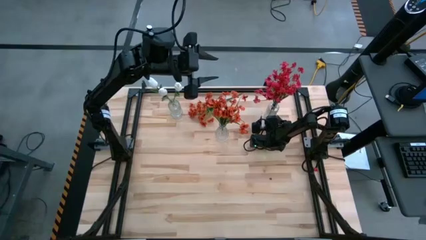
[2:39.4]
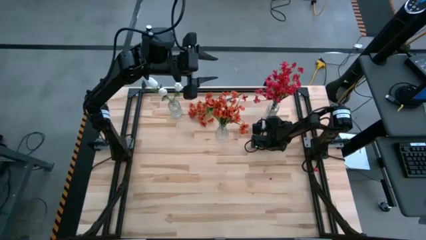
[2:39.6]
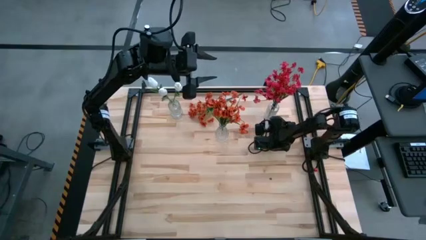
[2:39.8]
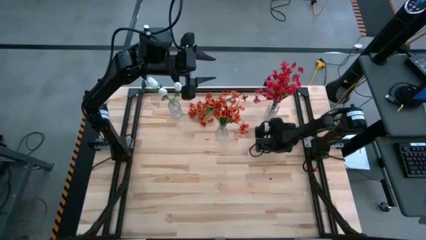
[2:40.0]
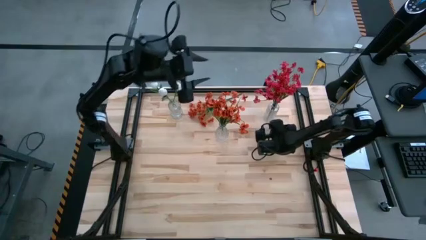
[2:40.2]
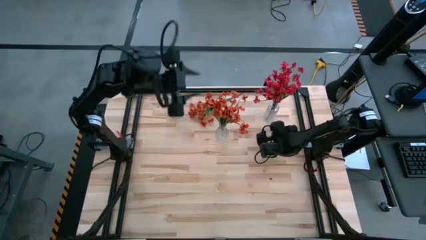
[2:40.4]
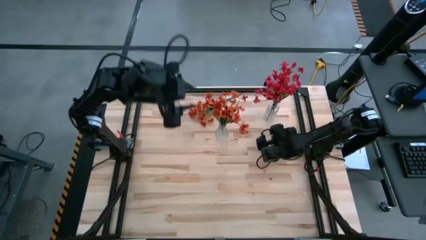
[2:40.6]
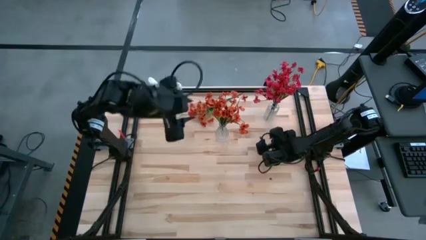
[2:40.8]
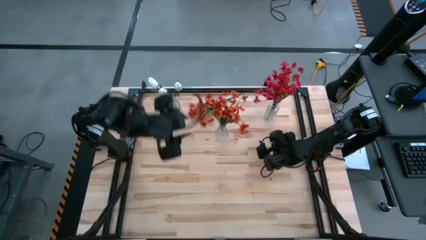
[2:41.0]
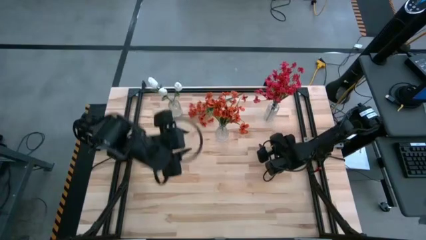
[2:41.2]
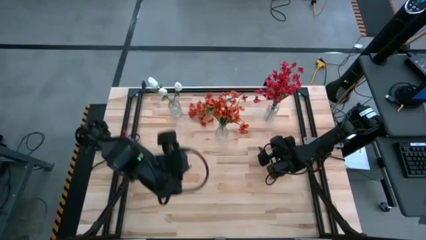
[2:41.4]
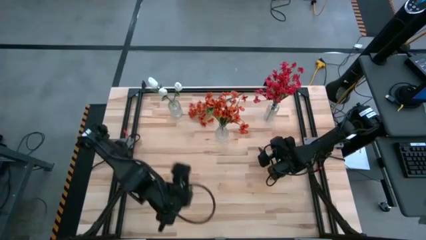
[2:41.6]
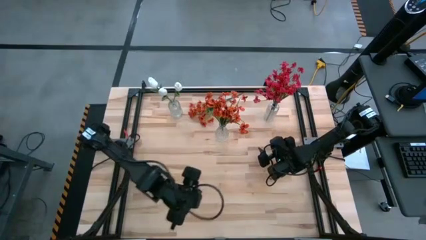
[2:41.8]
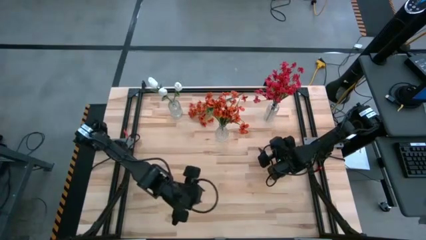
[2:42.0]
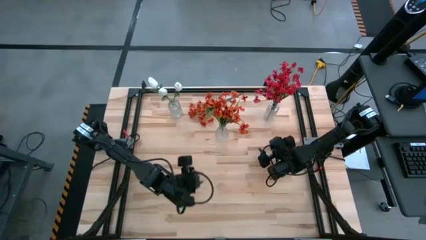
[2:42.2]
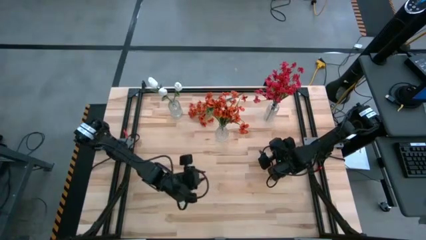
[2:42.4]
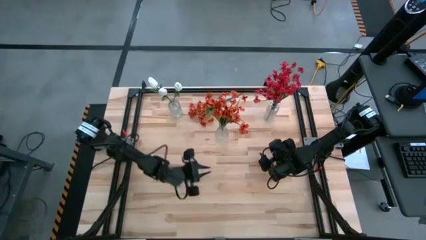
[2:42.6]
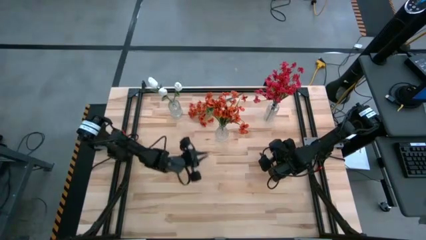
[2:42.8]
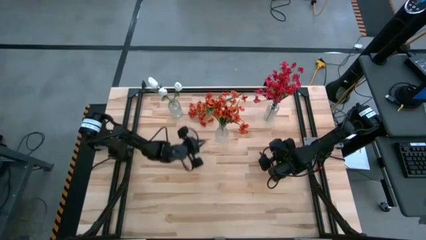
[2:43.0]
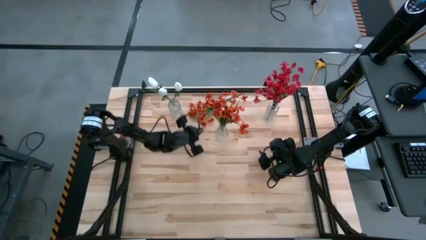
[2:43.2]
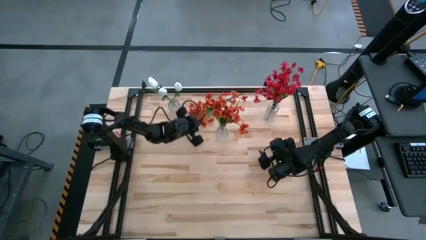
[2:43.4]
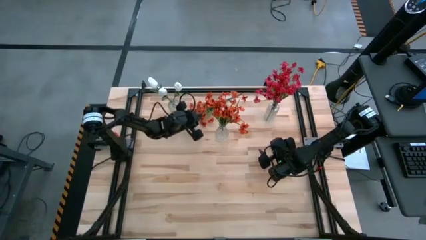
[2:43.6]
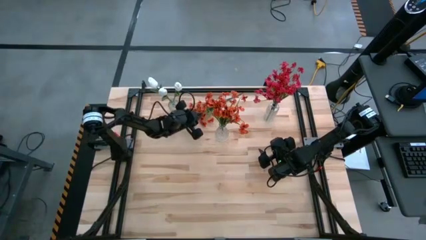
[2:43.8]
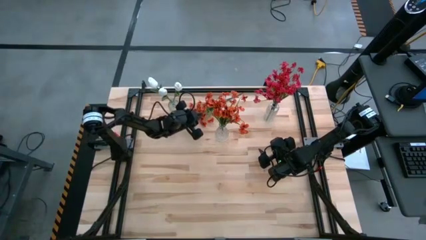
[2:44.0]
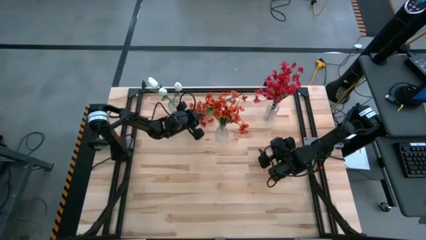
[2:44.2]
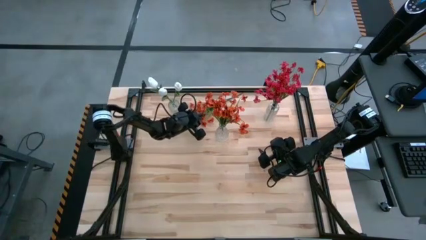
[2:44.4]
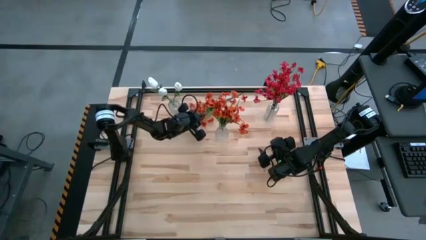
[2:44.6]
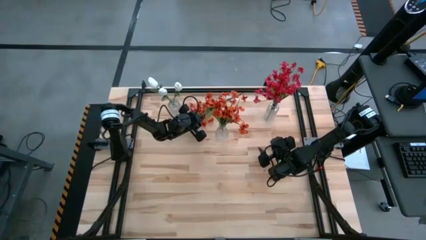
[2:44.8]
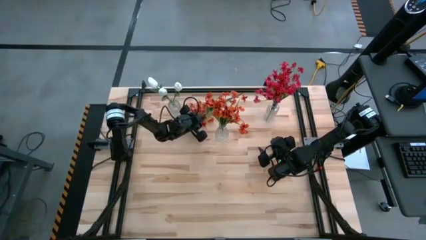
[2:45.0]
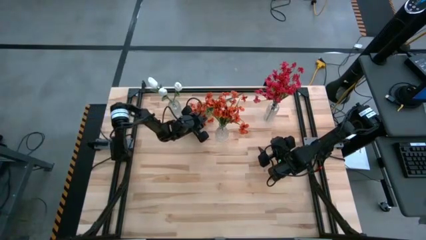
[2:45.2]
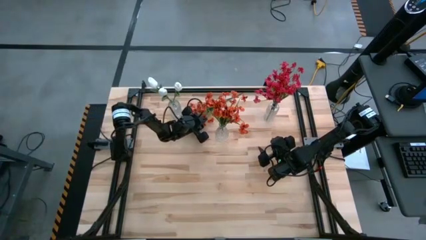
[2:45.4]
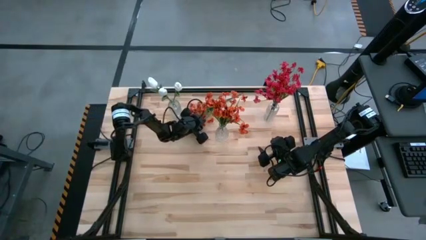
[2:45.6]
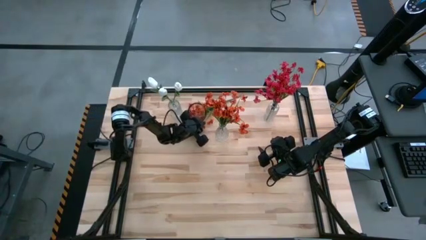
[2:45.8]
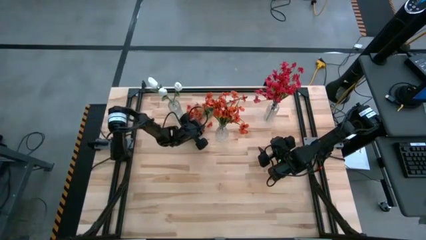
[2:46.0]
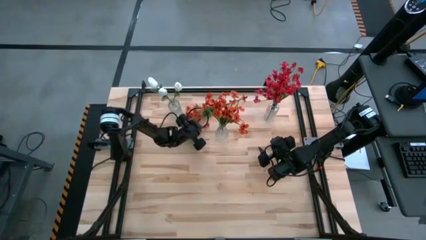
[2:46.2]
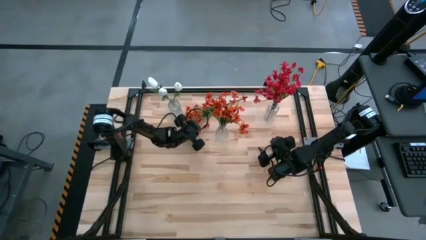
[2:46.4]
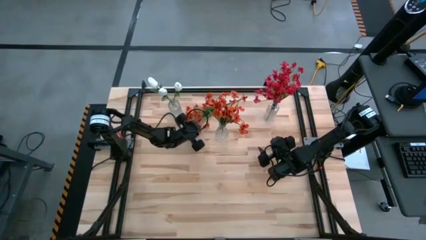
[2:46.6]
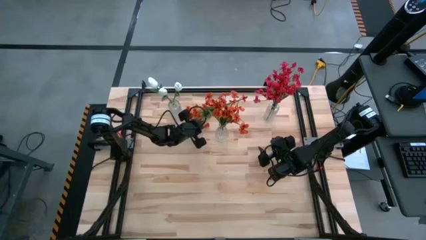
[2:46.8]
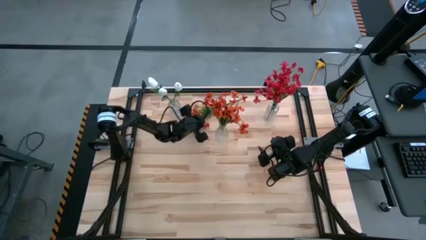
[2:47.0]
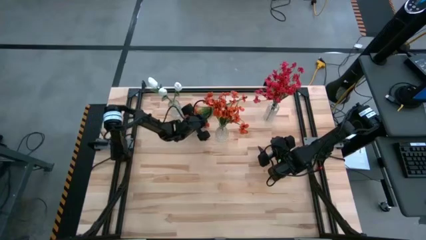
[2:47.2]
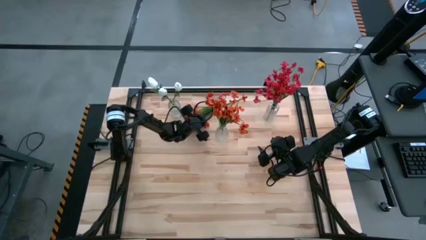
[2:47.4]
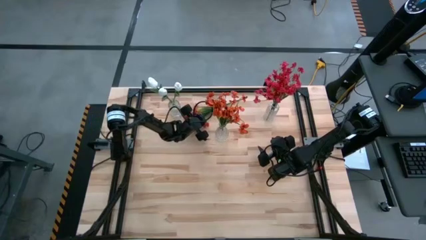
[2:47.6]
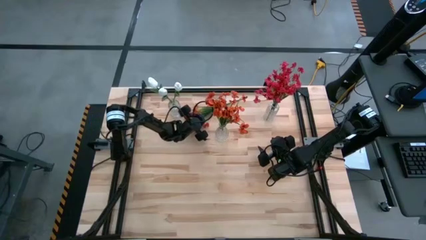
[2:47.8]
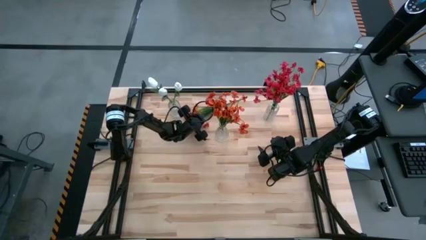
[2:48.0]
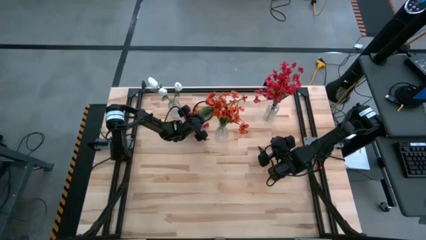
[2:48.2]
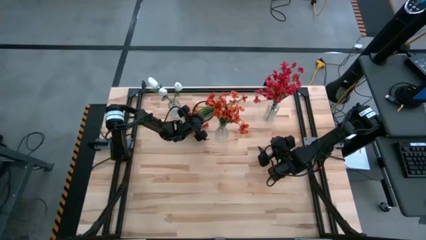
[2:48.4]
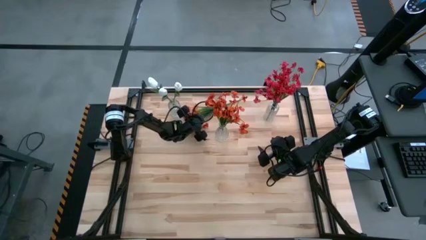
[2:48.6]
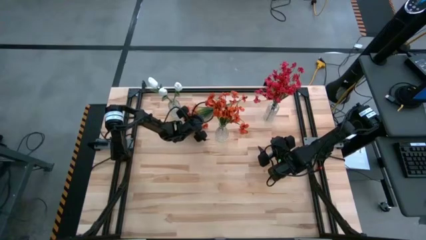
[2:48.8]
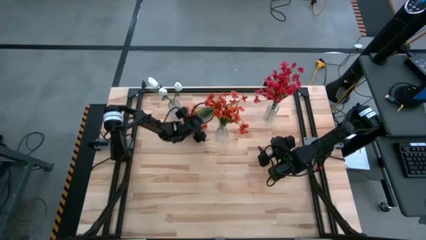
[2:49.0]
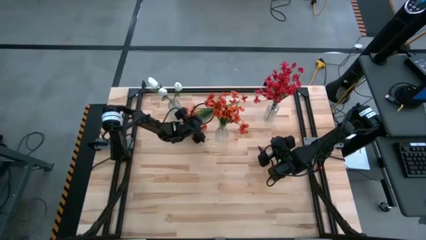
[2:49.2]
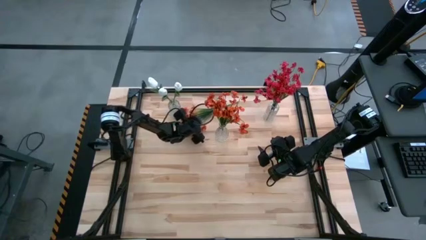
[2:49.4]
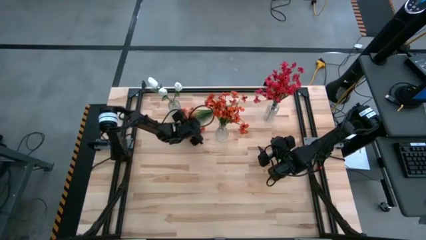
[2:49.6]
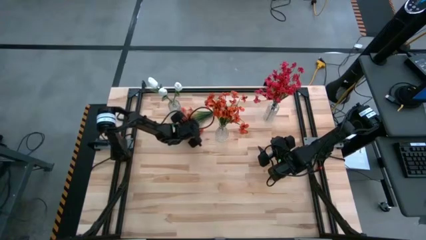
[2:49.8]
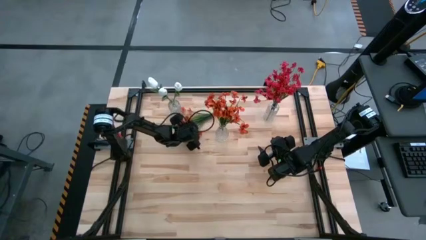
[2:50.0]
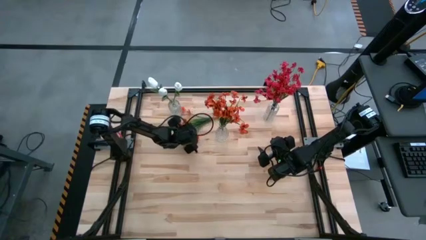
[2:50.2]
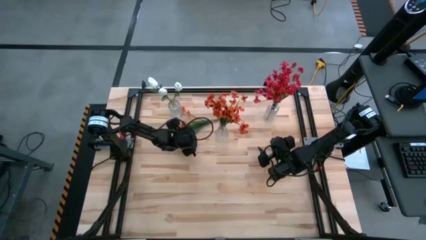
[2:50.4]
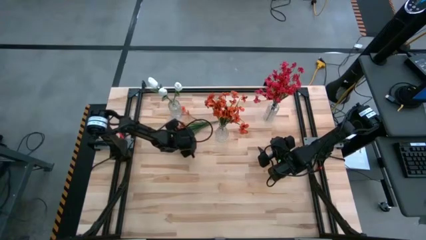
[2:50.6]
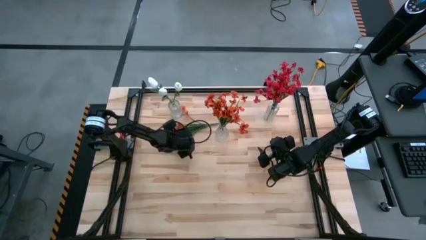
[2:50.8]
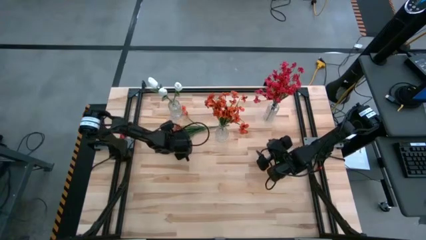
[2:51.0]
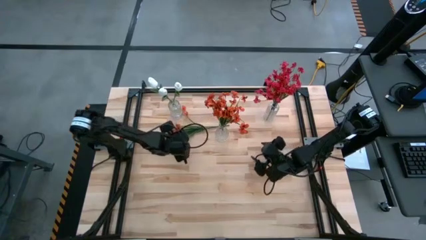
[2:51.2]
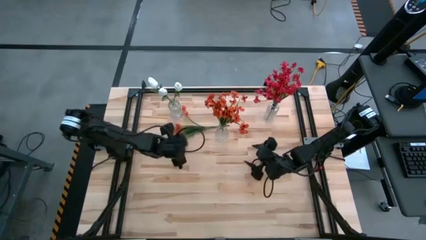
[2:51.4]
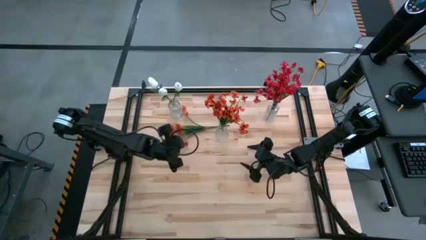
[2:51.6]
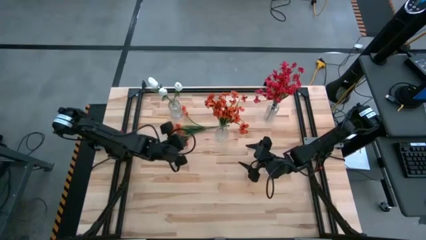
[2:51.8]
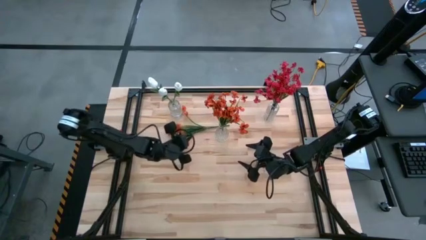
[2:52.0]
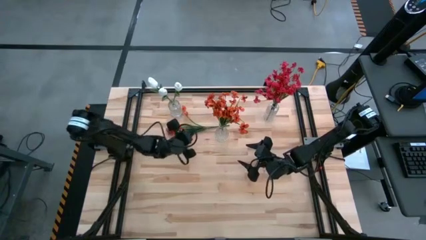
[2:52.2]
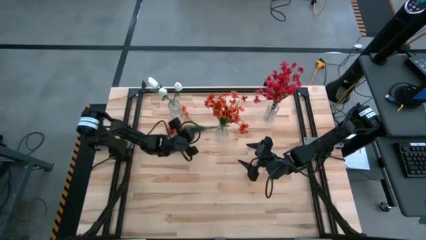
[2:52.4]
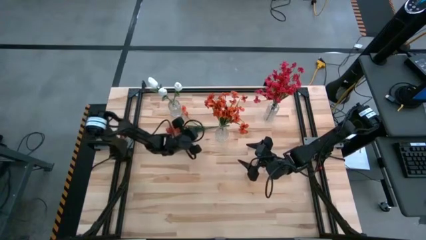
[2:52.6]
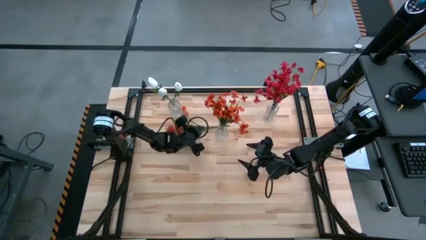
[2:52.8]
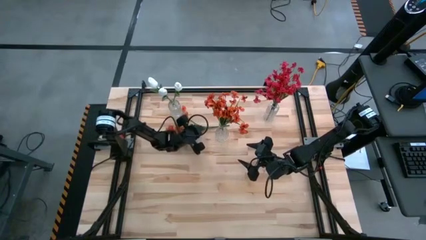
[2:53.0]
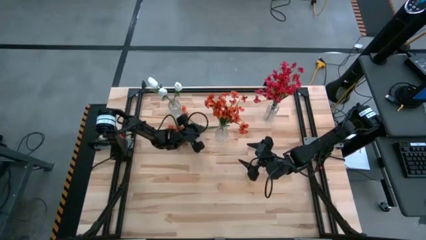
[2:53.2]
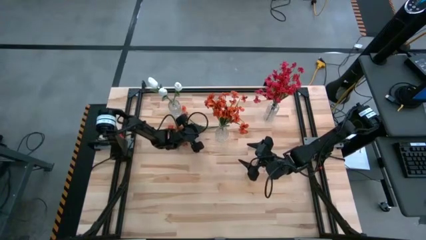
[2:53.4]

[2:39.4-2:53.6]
Task: Sort flowers into vase by color
Put the orange flowers into the bottom transparent vase

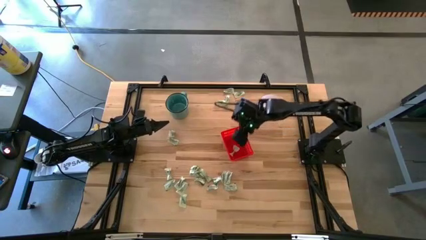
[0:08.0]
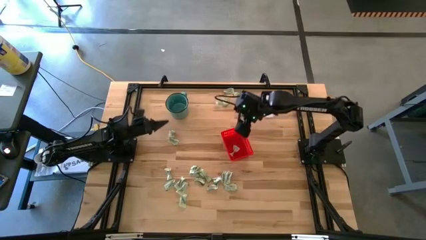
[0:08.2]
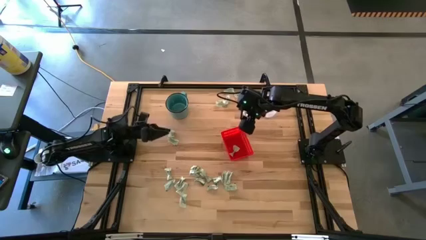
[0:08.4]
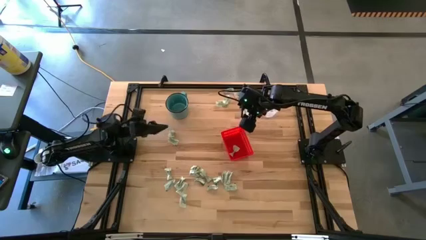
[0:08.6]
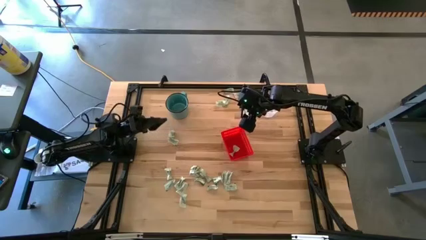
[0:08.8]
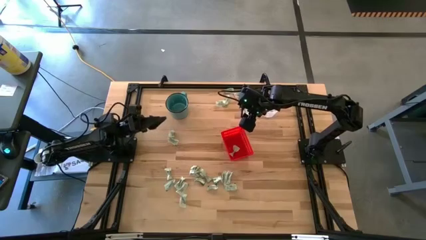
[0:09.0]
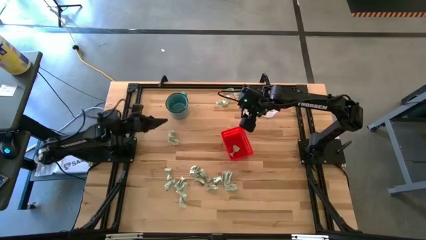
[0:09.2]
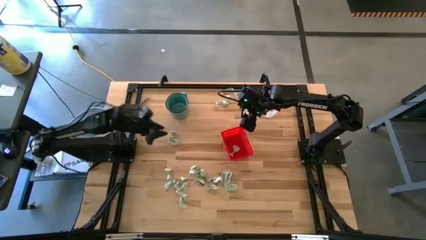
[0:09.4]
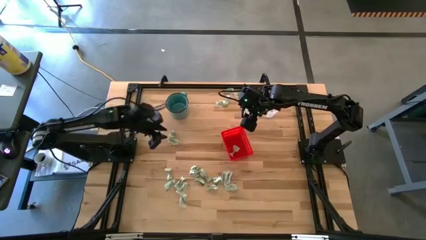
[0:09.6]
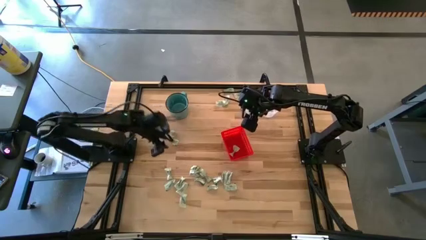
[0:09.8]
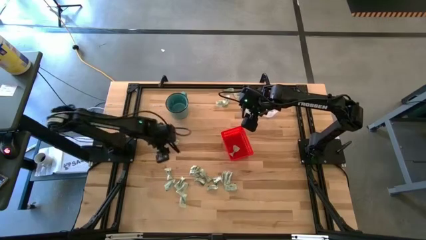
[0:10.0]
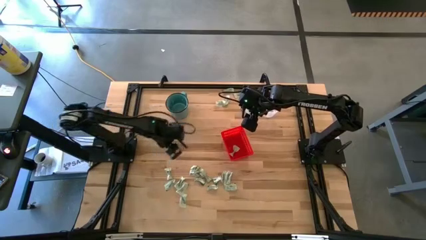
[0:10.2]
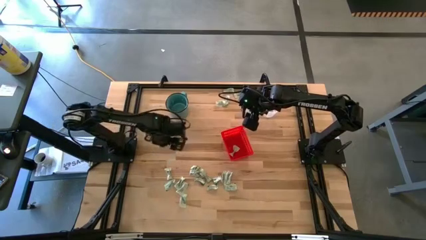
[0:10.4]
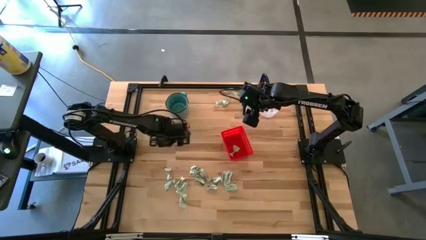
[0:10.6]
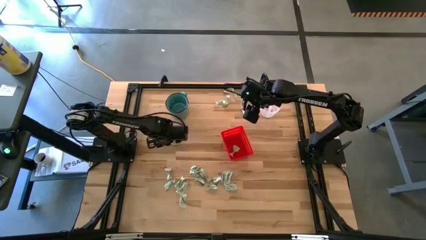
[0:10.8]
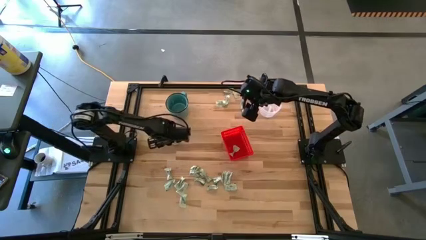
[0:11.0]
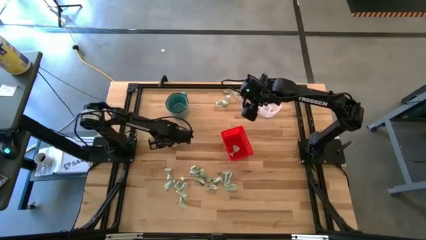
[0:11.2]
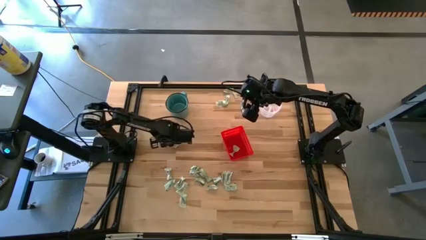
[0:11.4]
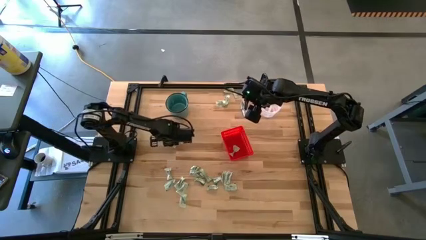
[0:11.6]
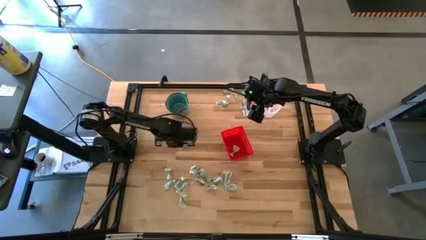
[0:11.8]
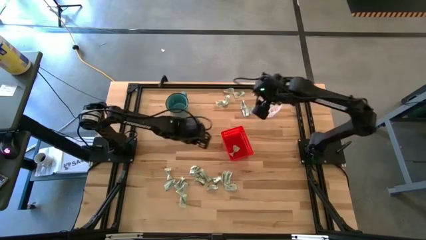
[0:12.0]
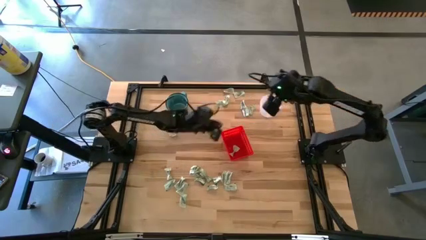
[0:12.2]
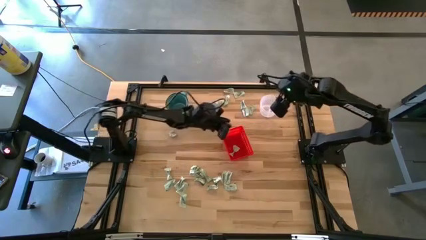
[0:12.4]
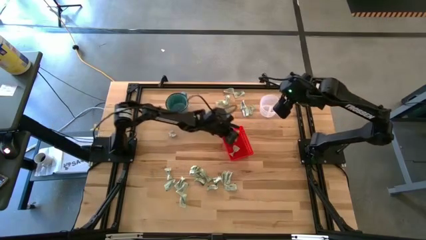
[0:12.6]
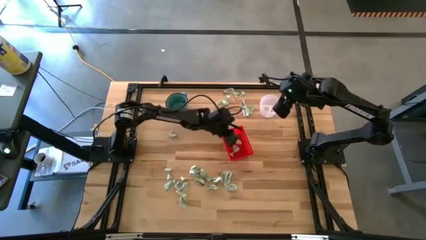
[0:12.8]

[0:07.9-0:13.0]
Task: Pick and place items into bin
Put the stevia packet into the orange bin
